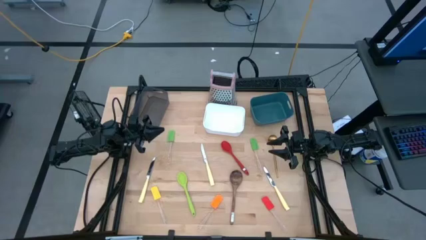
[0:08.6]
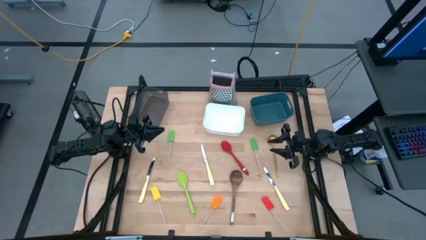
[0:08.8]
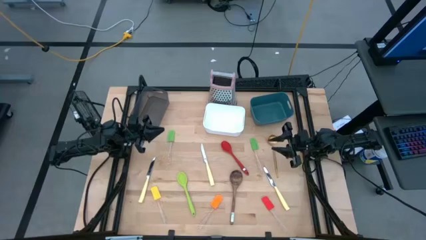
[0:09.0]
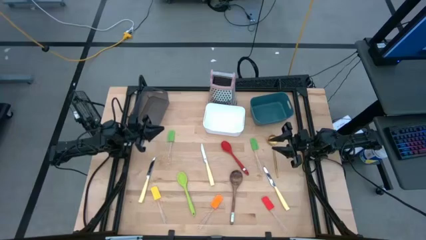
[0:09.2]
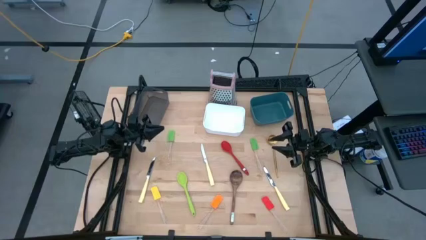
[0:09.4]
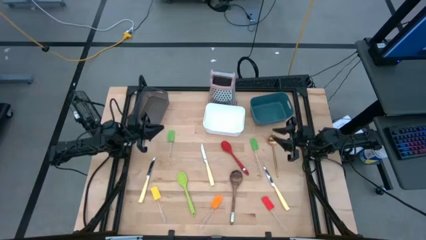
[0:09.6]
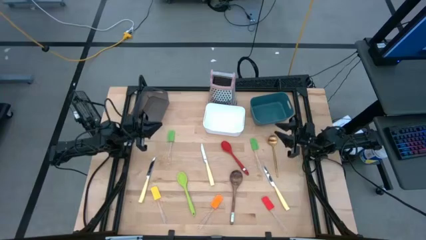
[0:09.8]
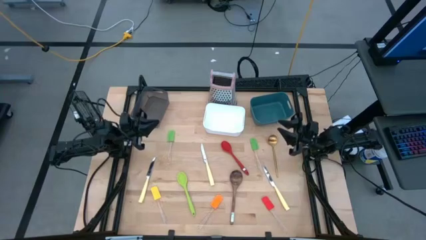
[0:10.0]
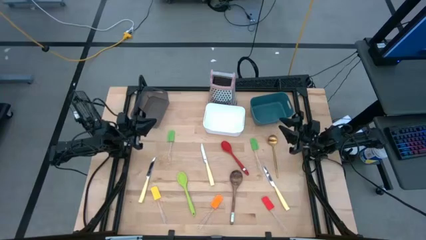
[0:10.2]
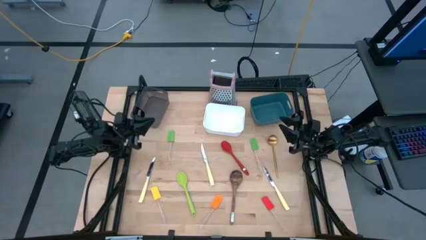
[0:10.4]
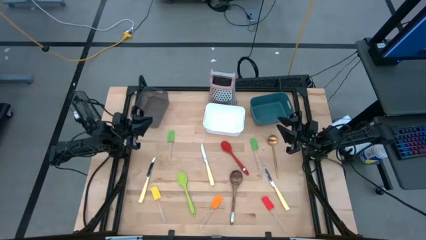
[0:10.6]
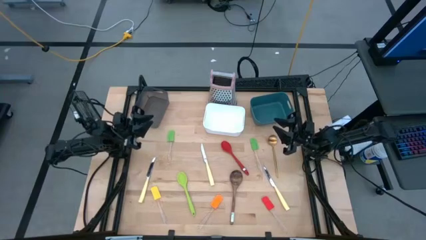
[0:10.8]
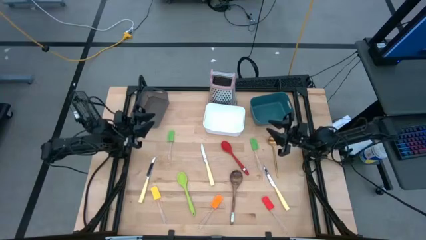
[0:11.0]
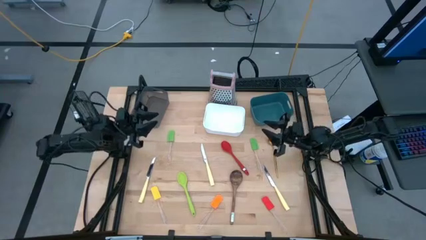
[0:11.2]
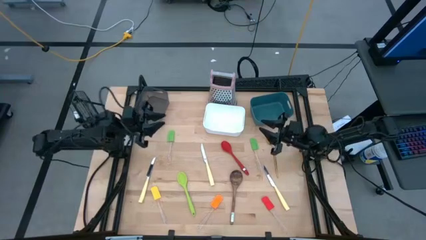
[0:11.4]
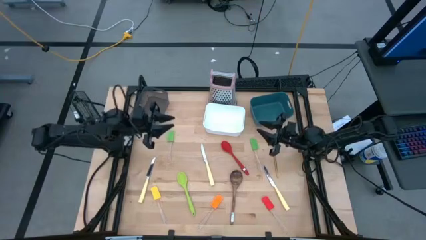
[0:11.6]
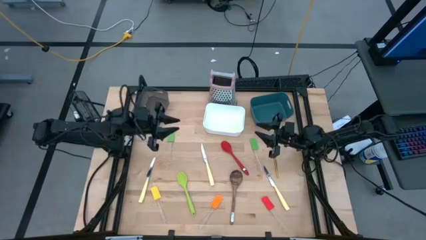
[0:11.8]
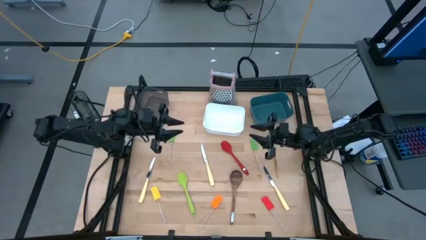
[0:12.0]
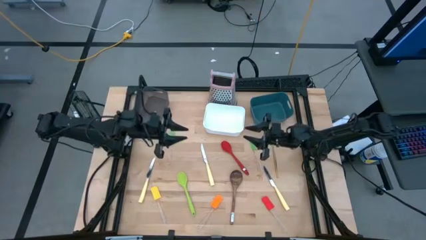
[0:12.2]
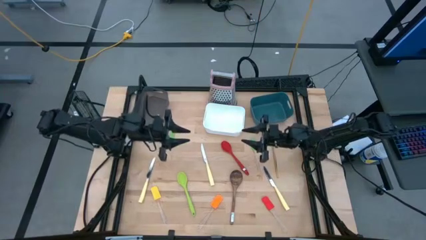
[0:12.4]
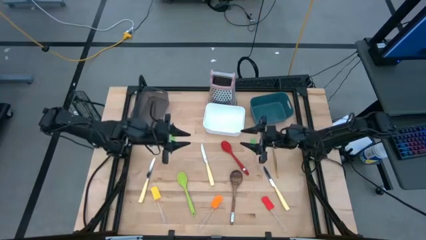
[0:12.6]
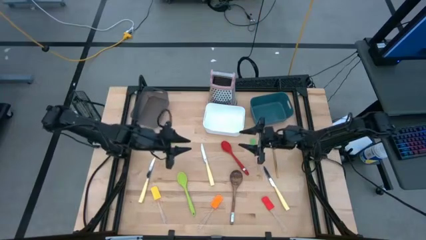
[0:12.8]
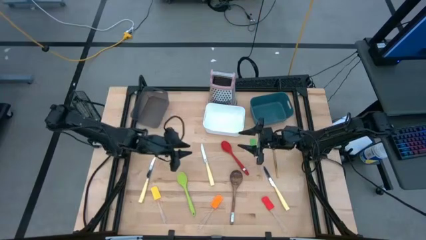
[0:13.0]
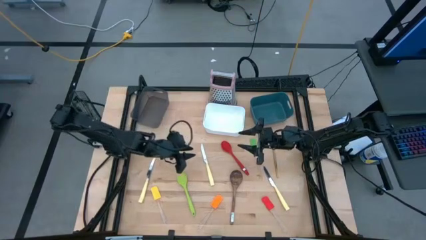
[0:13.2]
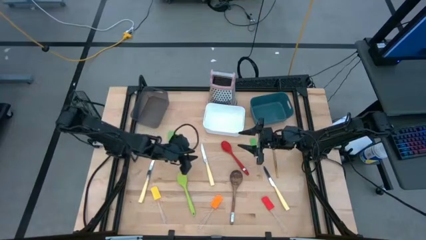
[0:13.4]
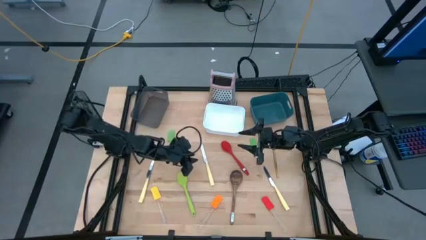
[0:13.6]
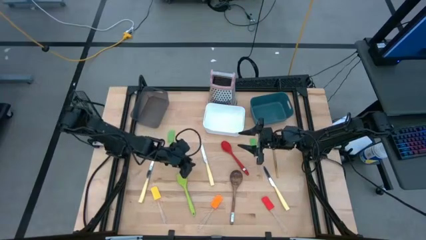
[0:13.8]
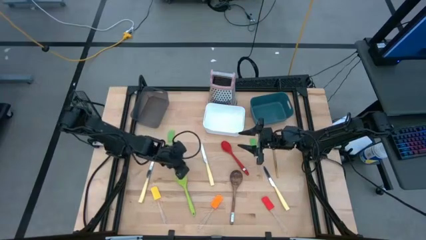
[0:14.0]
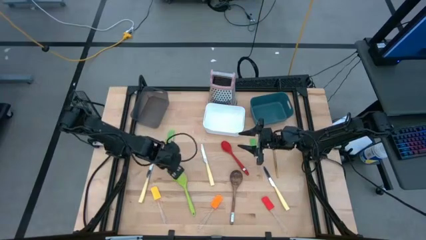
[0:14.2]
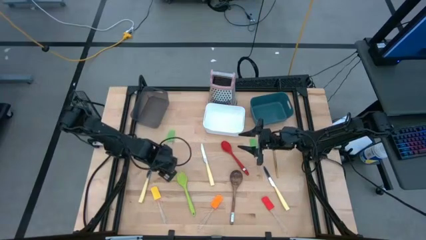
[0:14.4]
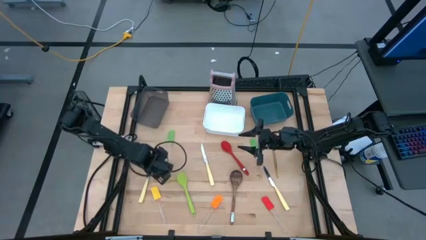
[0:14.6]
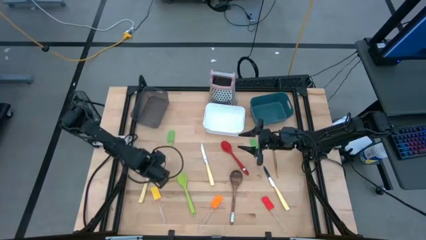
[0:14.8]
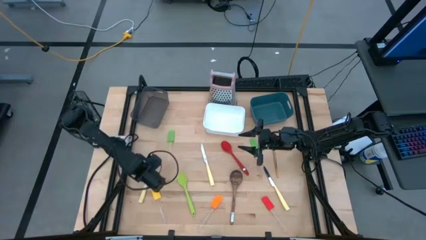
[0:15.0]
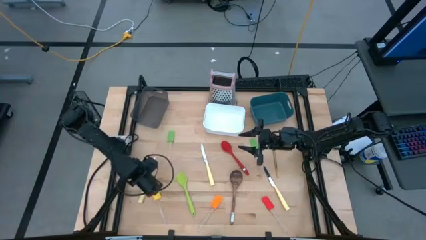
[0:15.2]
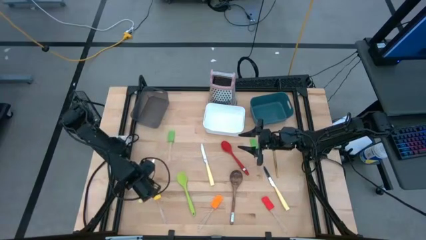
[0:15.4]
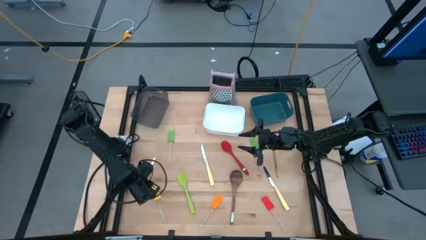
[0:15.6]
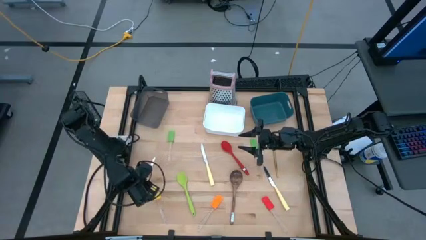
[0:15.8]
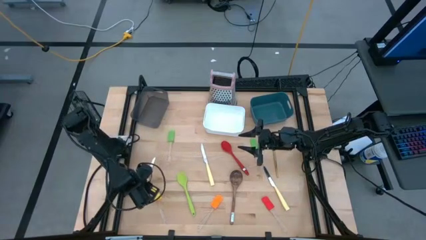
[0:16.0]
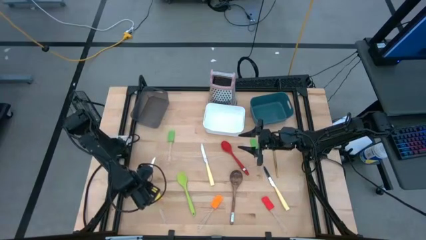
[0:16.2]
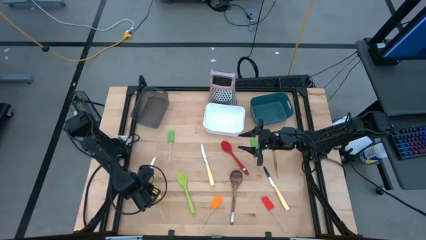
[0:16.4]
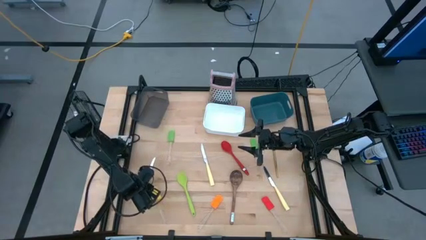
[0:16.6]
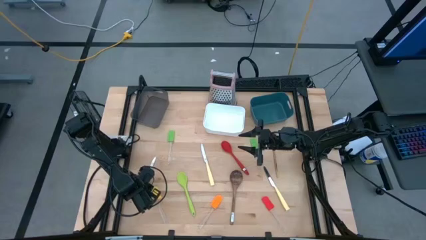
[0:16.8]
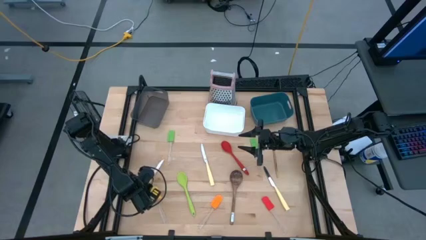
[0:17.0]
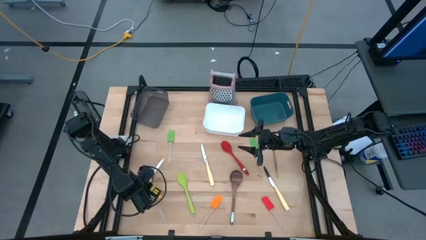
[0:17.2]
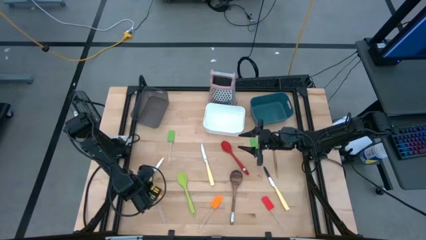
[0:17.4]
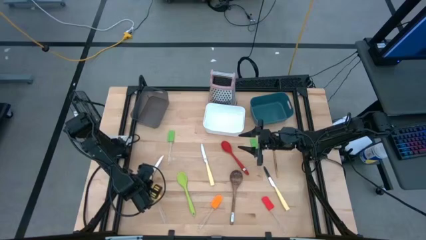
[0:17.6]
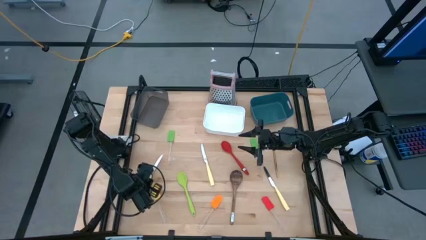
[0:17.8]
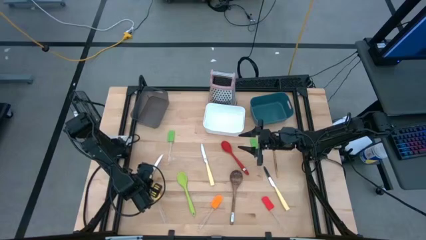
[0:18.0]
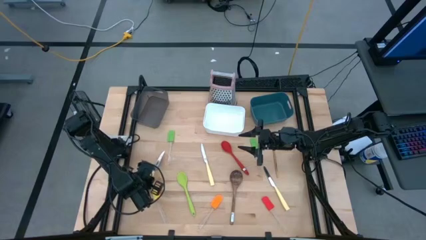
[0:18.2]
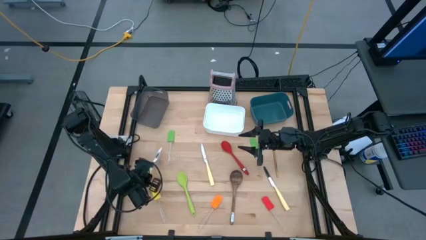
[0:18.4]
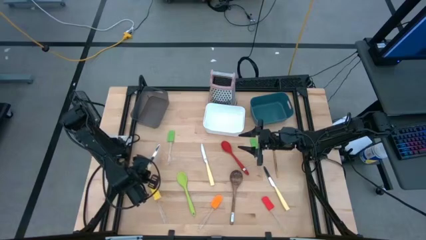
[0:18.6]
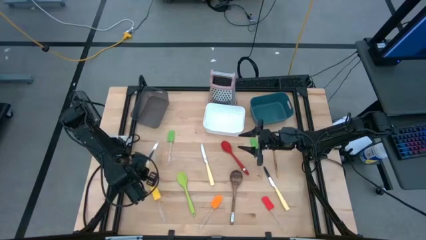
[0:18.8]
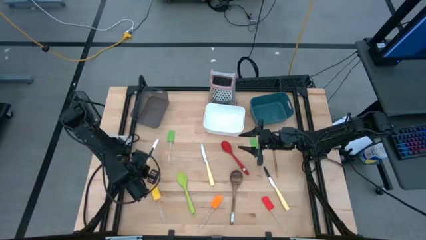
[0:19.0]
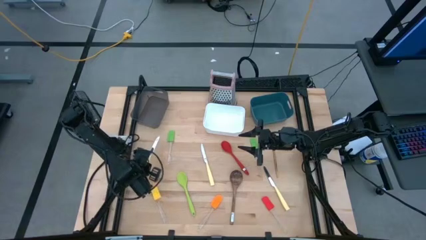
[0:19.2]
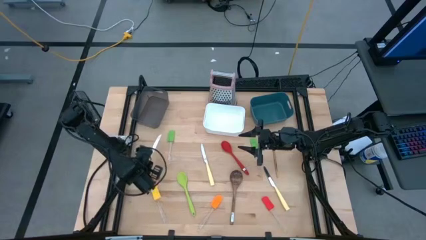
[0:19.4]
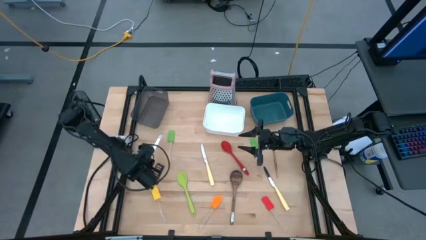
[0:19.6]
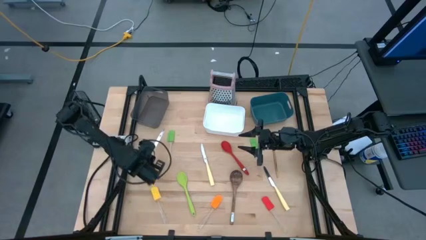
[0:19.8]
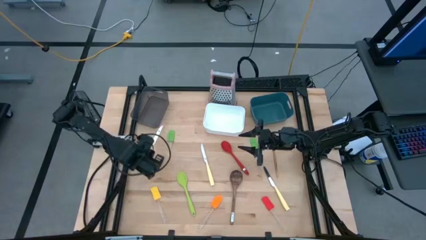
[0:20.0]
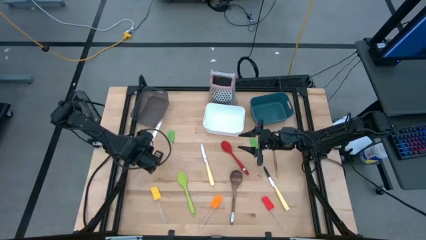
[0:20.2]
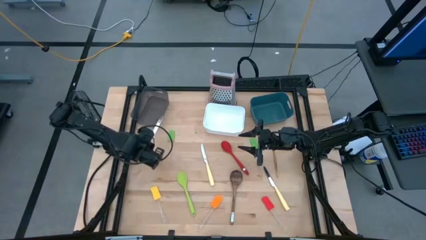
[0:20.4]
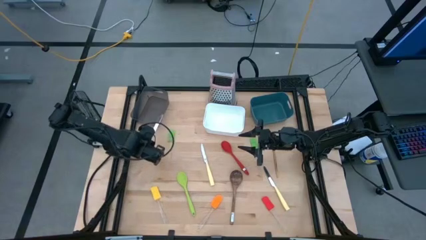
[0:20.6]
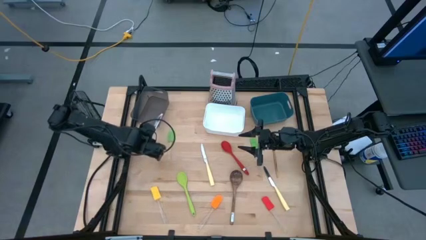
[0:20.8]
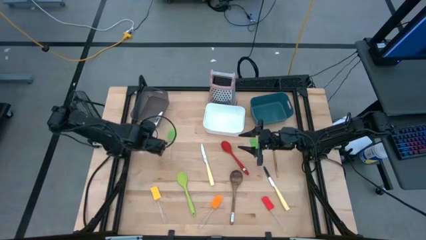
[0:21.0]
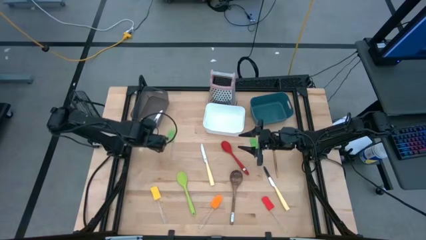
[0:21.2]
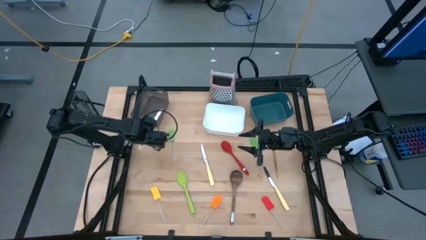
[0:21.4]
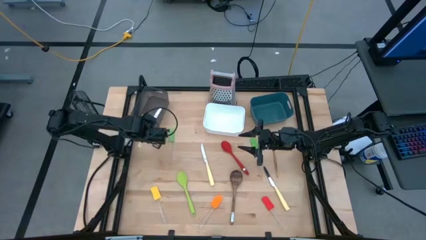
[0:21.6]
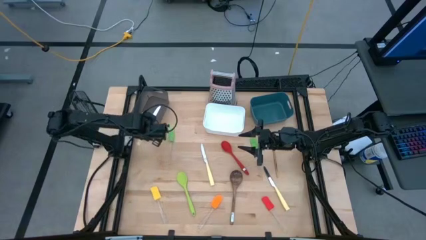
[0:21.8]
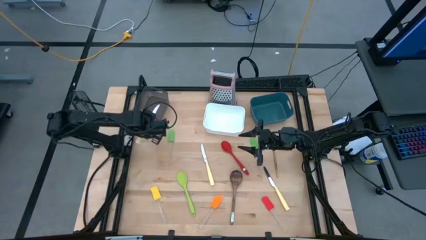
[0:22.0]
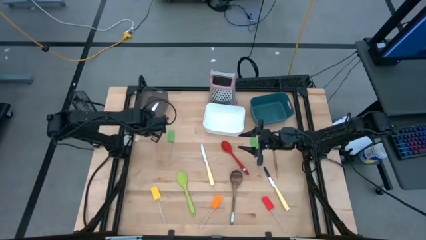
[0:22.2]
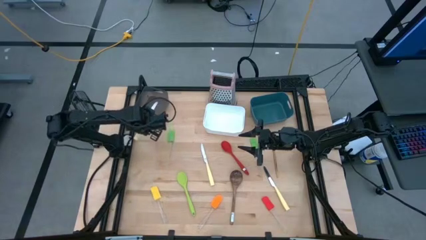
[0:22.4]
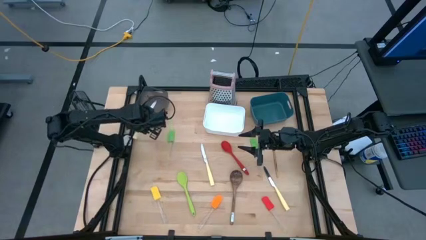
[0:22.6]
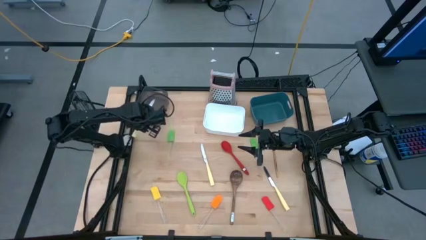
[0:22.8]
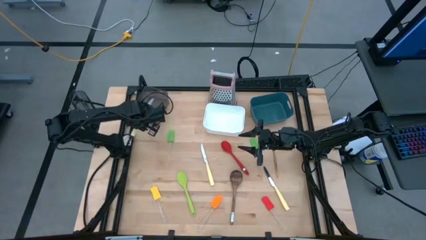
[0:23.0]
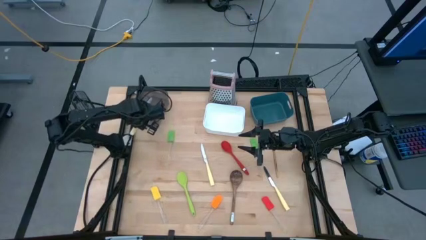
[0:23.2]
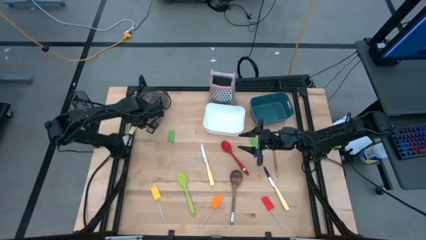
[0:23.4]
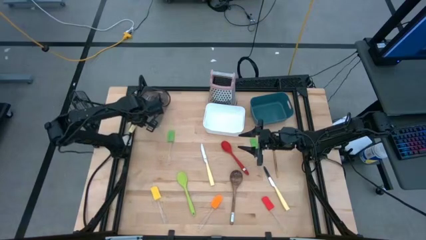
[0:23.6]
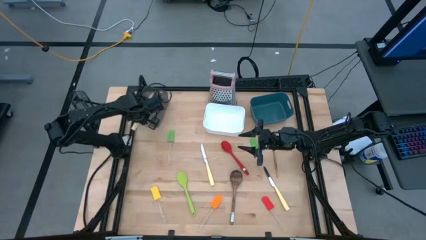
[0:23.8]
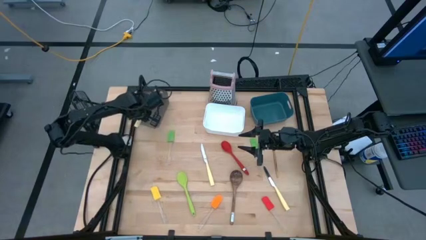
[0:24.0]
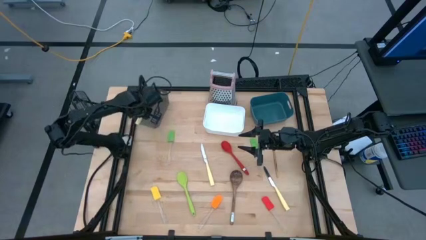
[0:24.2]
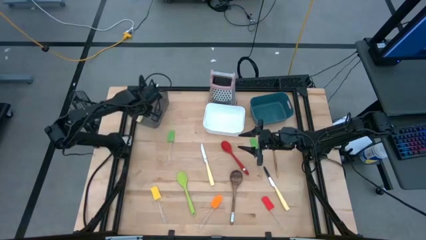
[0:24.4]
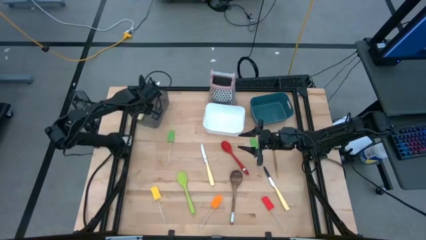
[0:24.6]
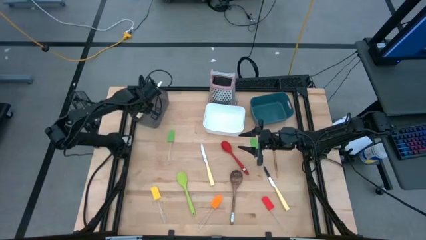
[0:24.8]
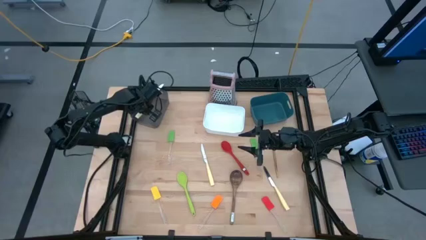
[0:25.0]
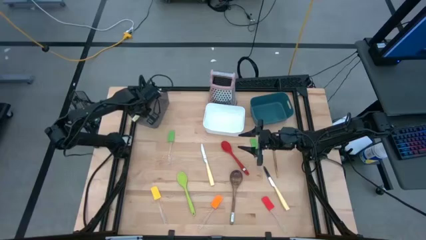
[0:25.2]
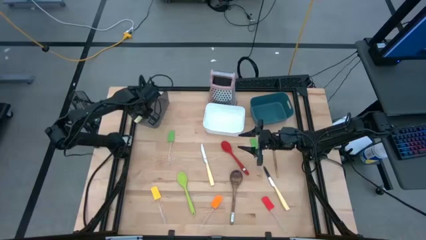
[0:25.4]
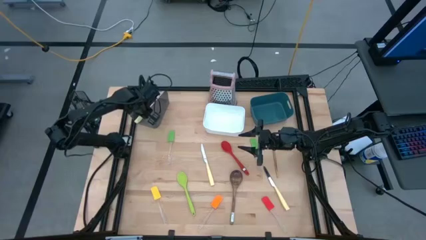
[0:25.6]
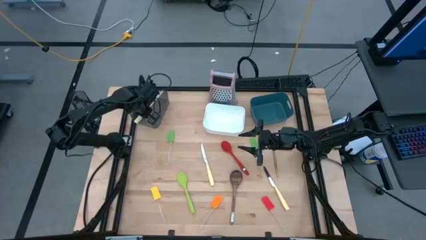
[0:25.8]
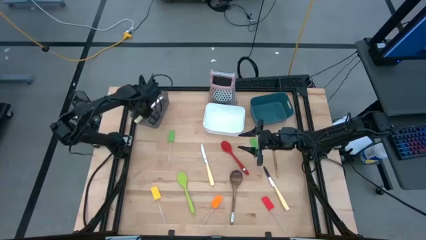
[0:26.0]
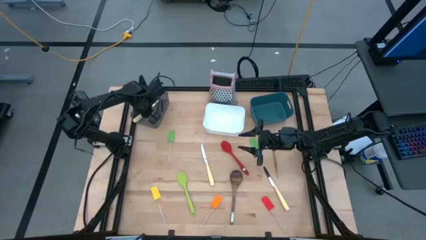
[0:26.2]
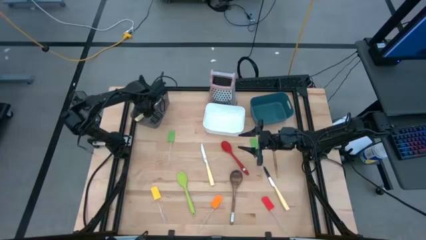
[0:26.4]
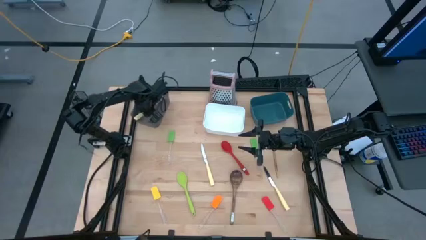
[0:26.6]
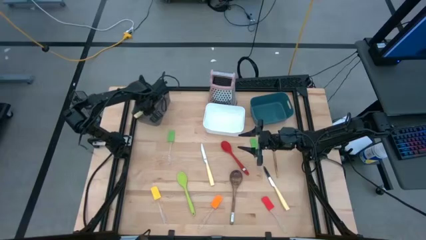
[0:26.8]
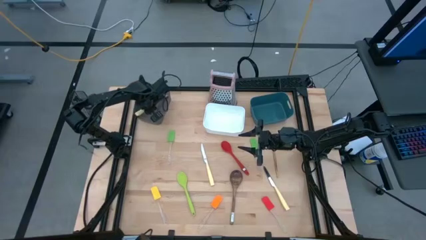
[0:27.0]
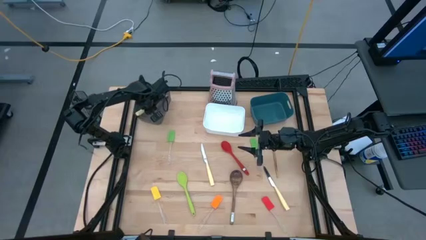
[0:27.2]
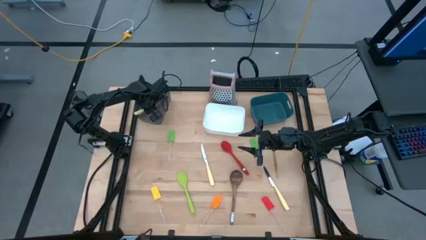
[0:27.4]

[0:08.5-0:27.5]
Task: Pick & Place Kitchen Items
Put the bottom left yellow knife into the black bin
